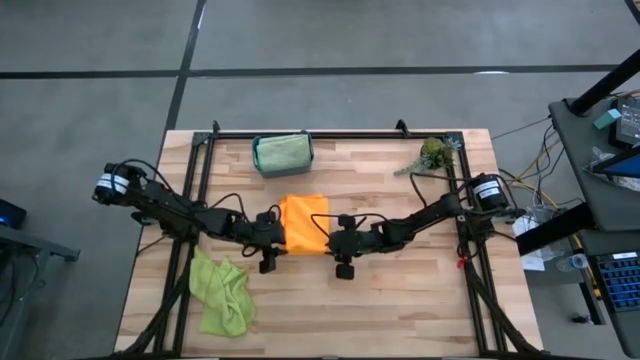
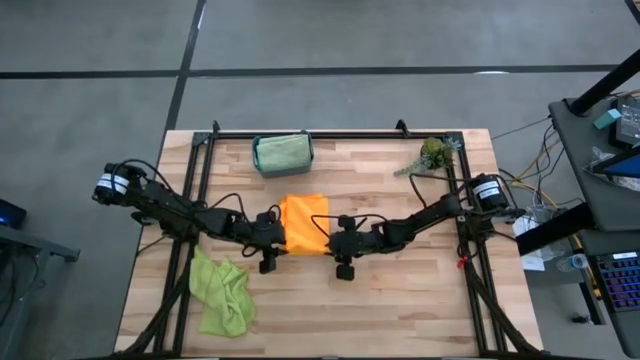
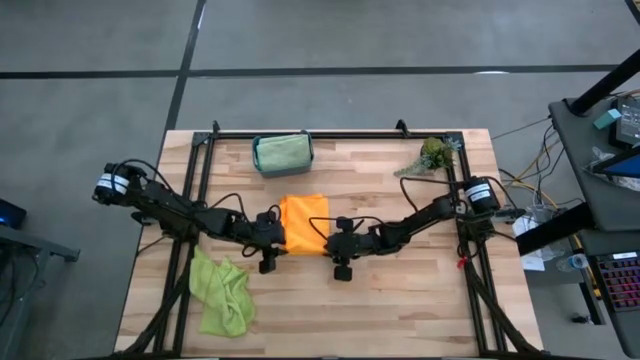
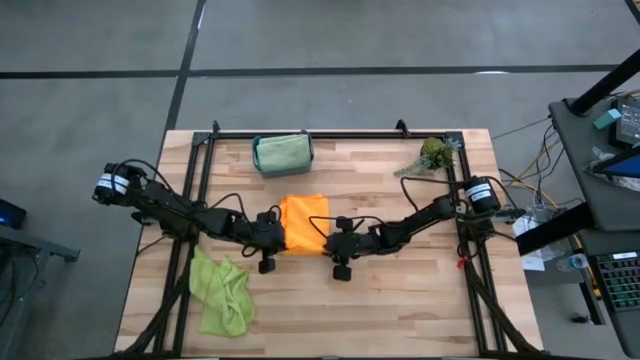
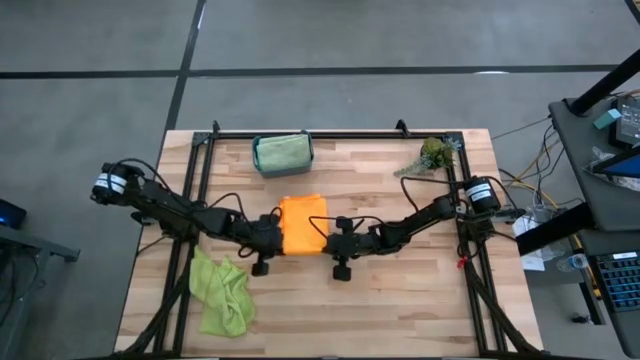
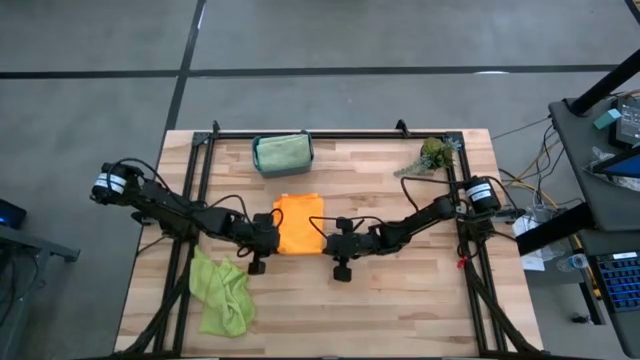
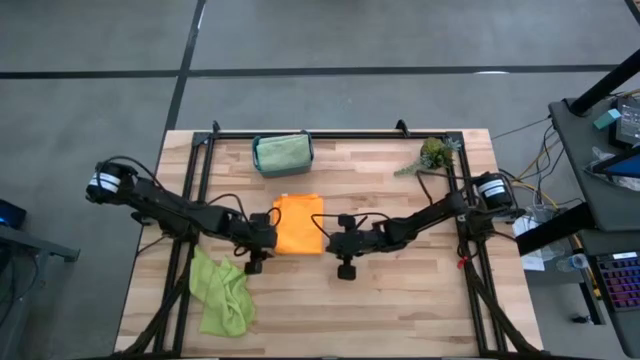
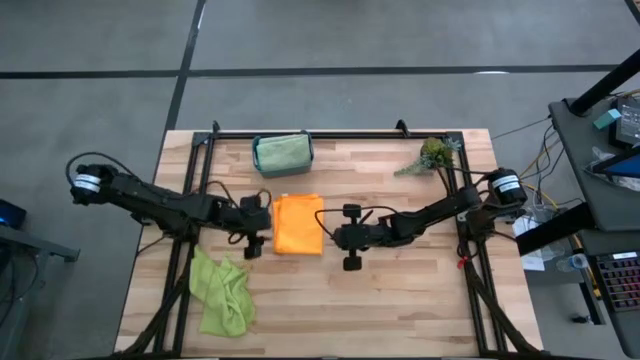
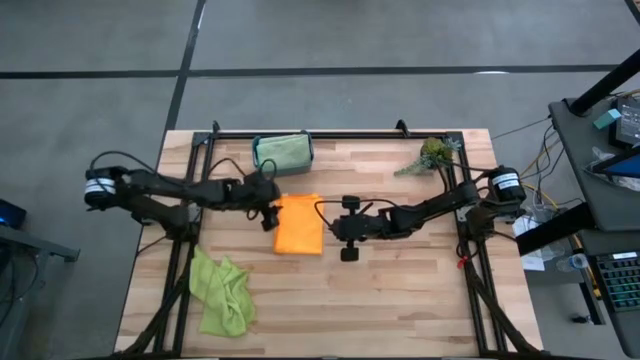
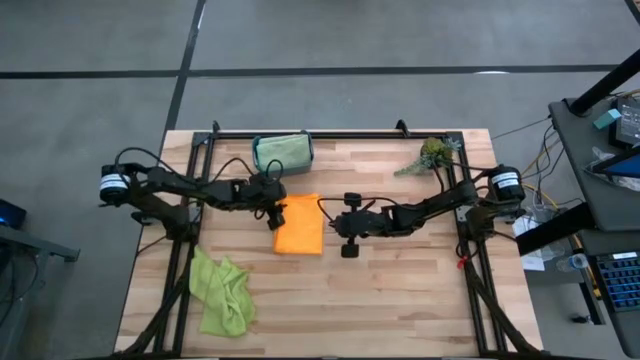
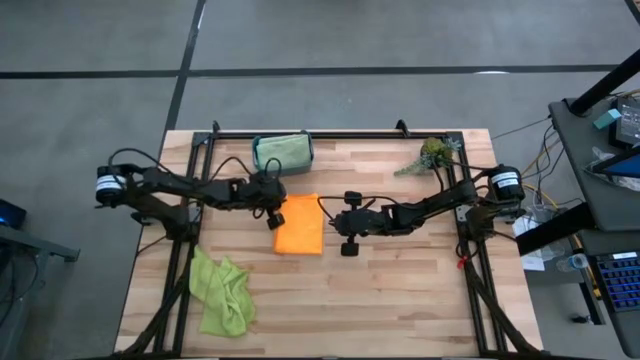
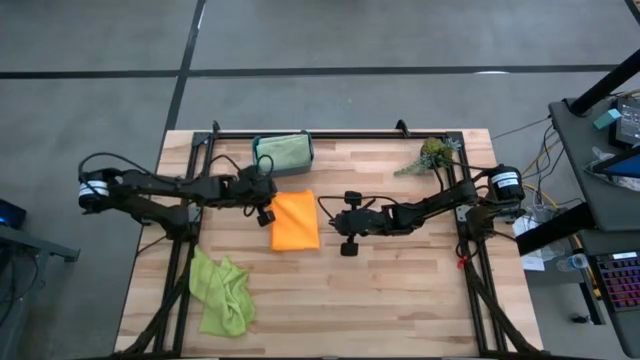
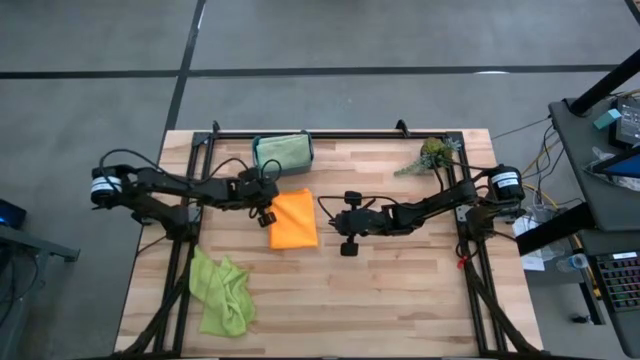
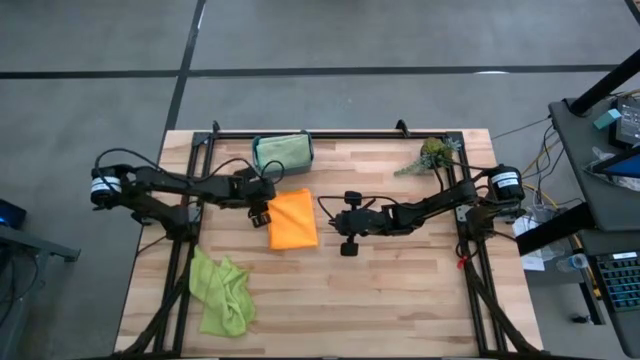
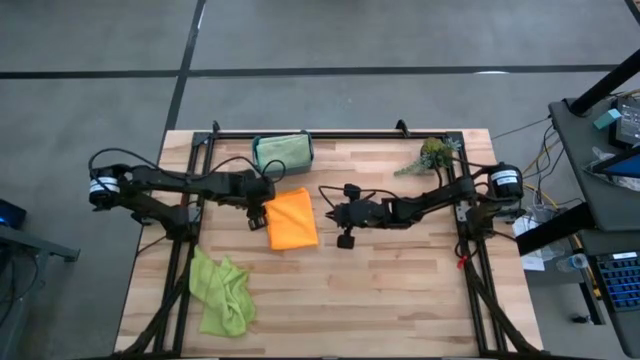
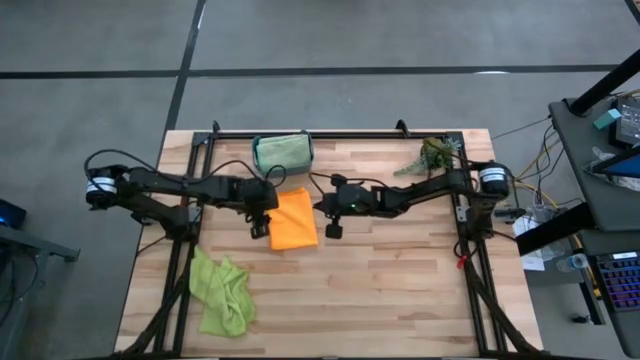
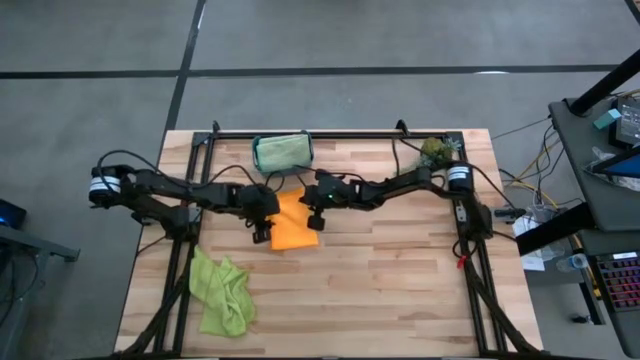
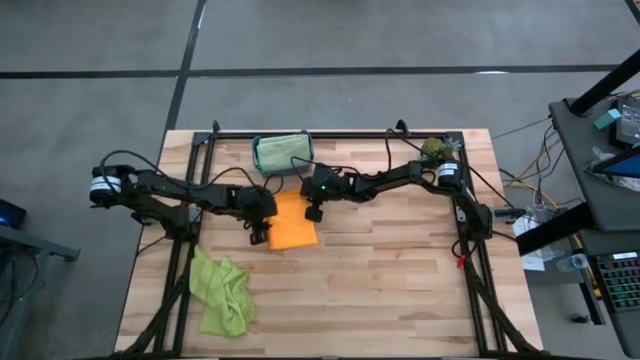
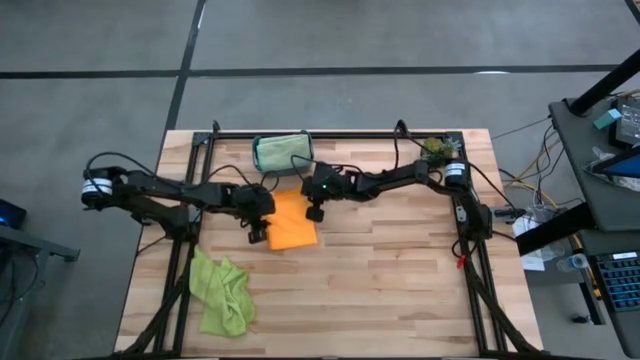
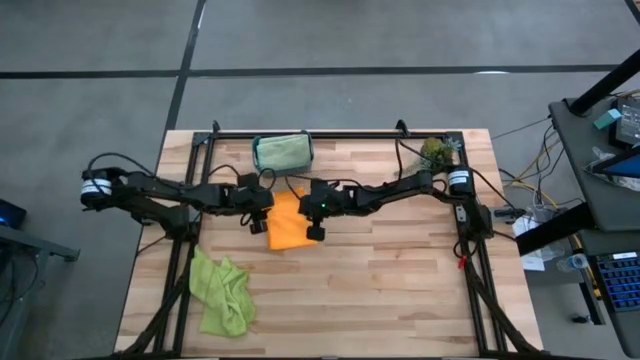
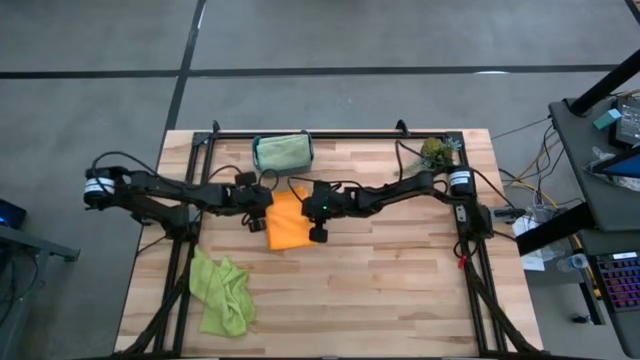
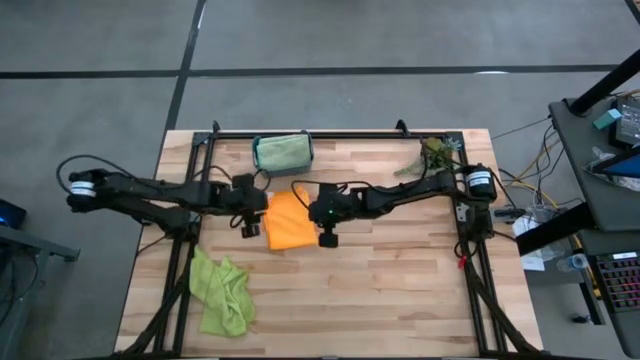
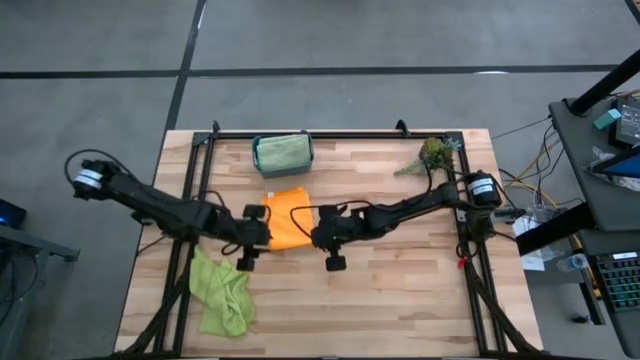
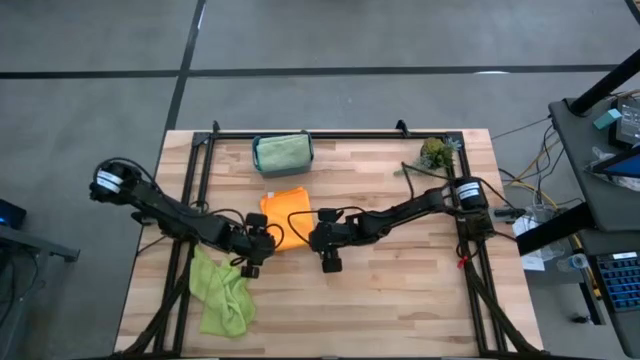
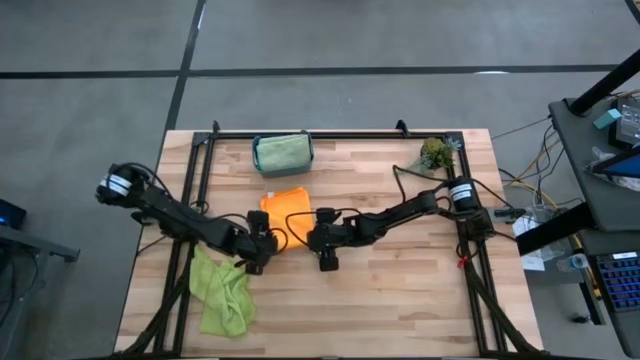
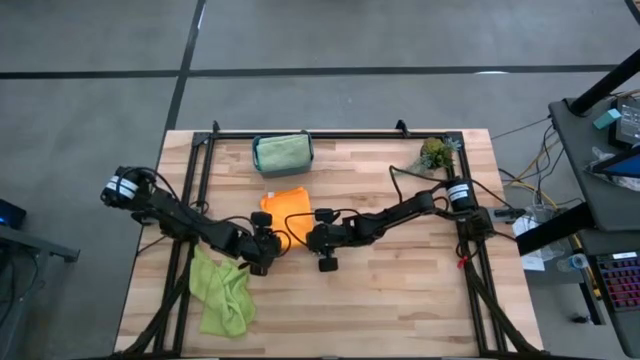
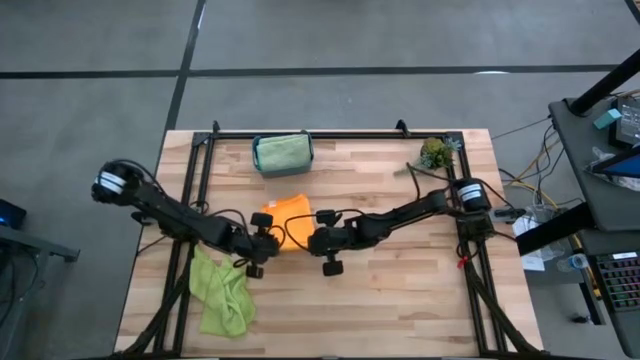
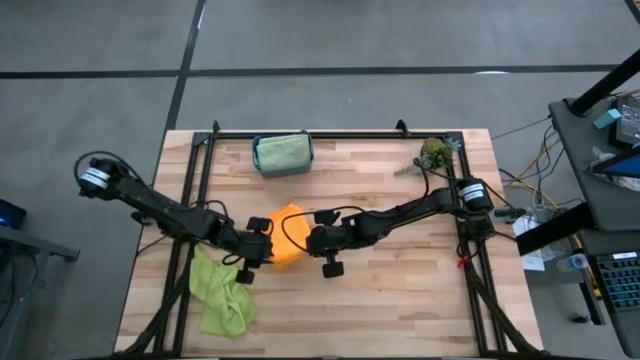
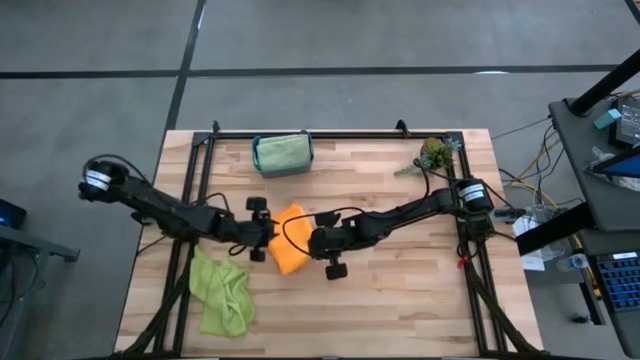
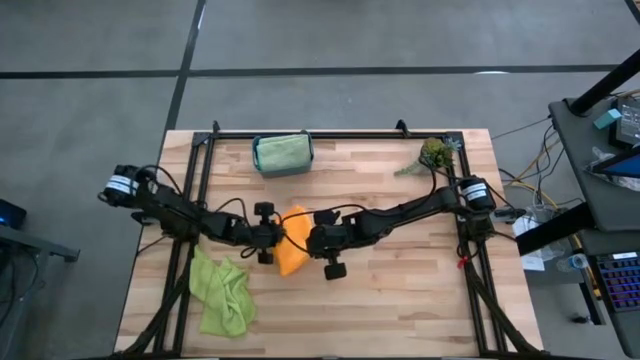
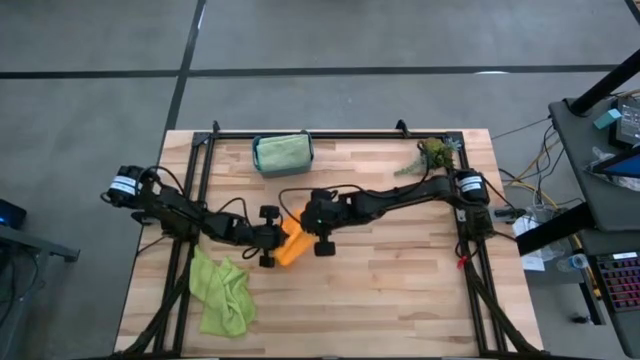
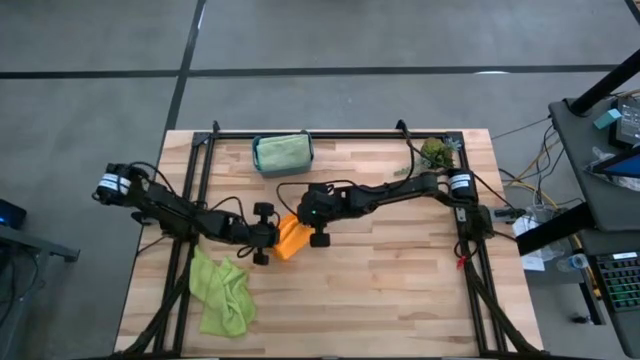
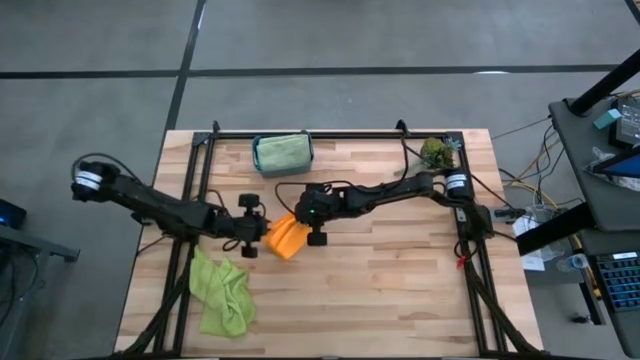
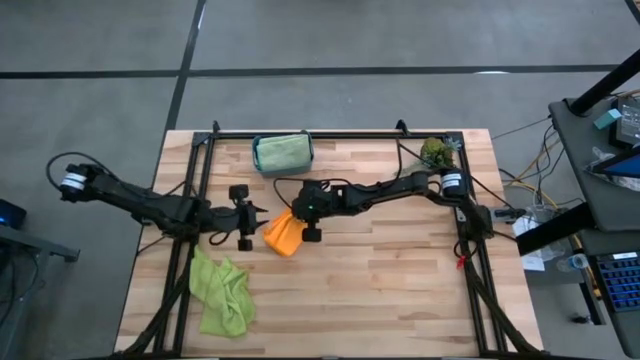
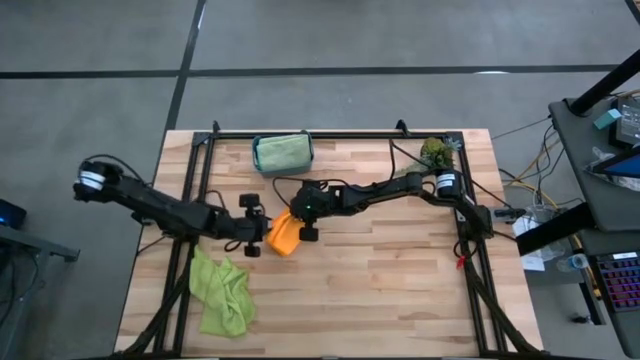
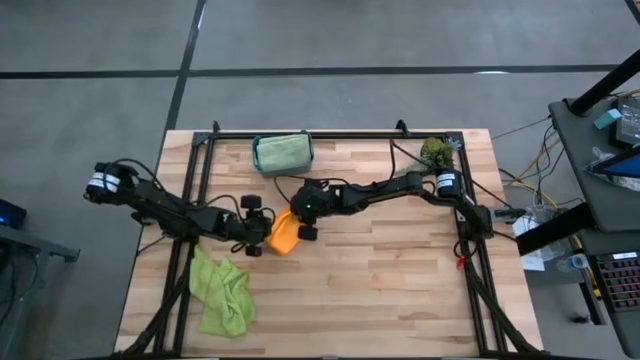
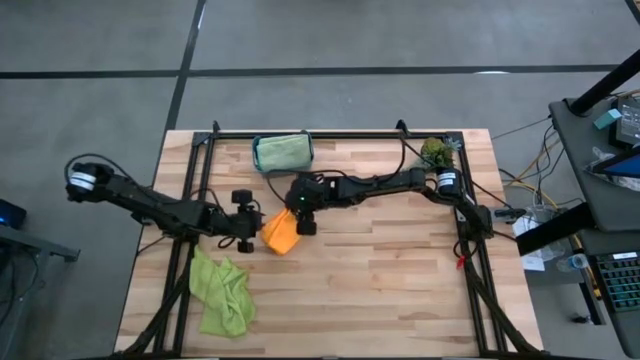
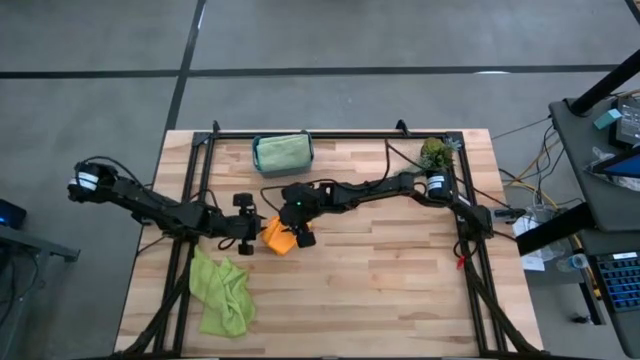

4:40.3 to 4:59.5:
Task: Fold microfiber towels
Fold the orange microfiber towel

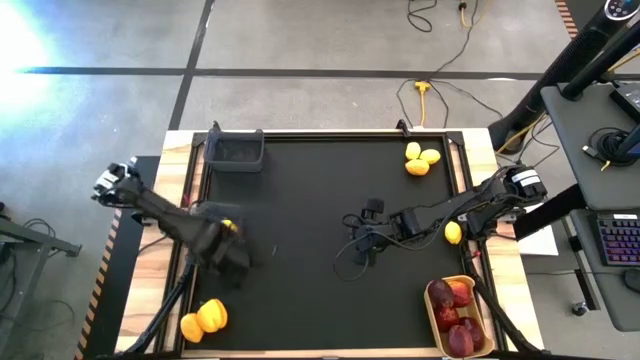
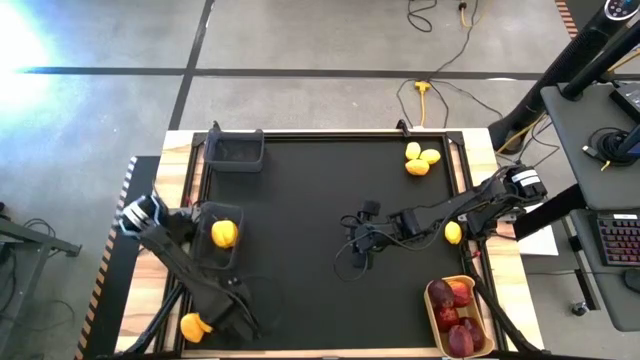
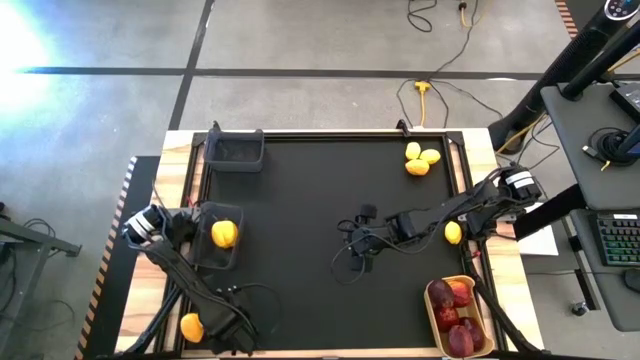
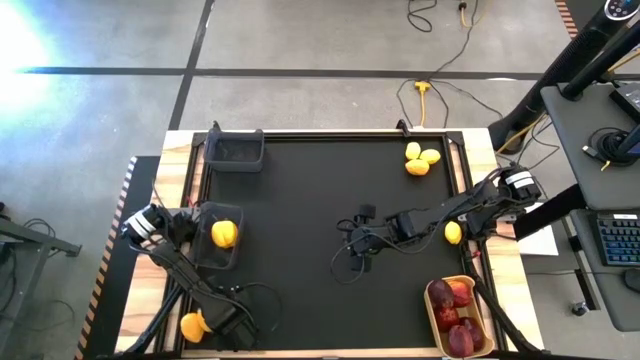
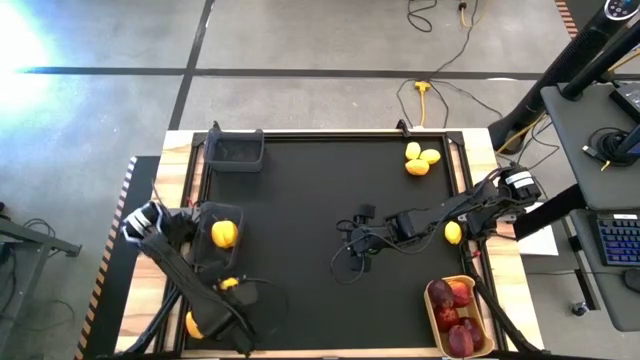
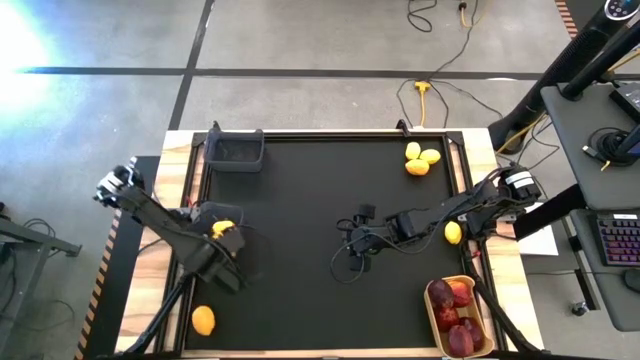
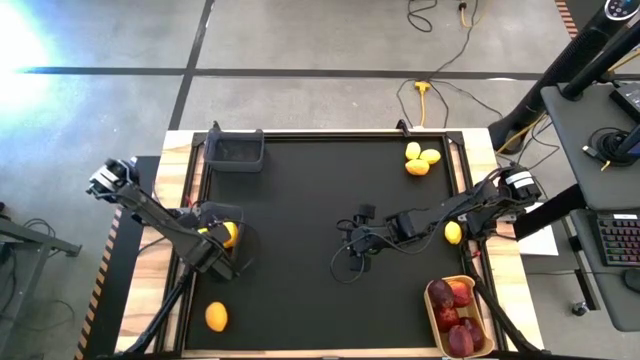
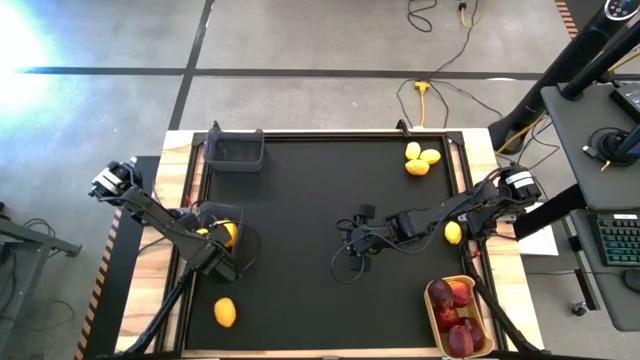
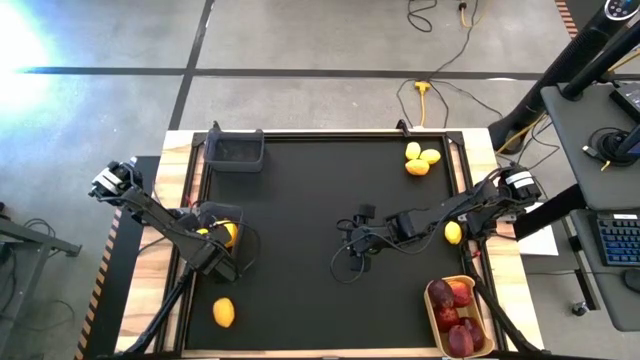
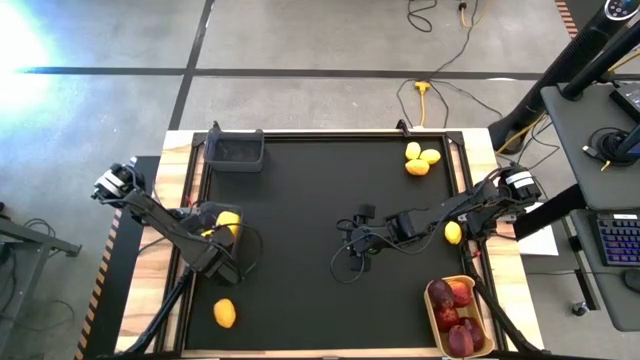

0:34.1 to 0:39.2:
Task: Sort produce into baskets
Put the bell pepper into the bottom black bin
